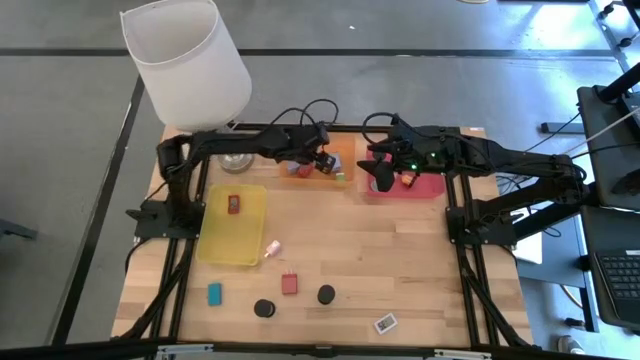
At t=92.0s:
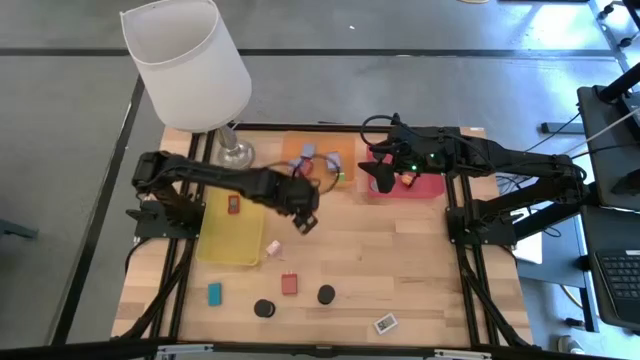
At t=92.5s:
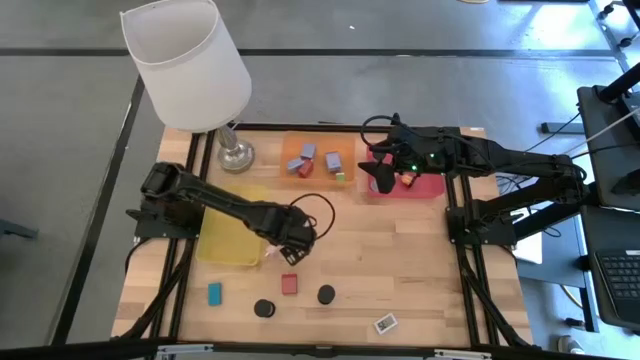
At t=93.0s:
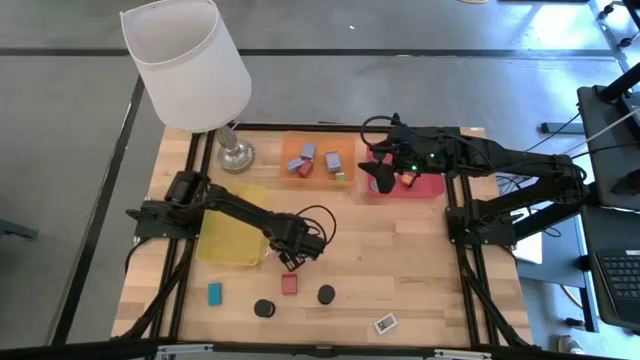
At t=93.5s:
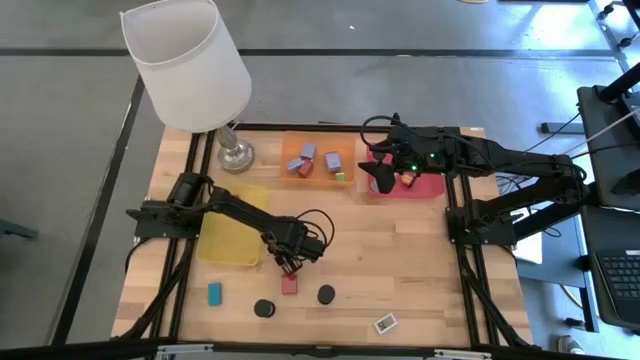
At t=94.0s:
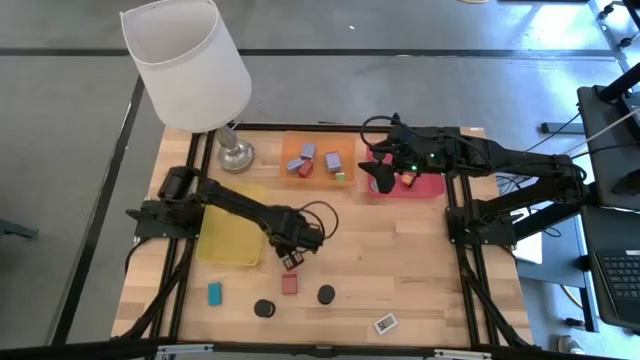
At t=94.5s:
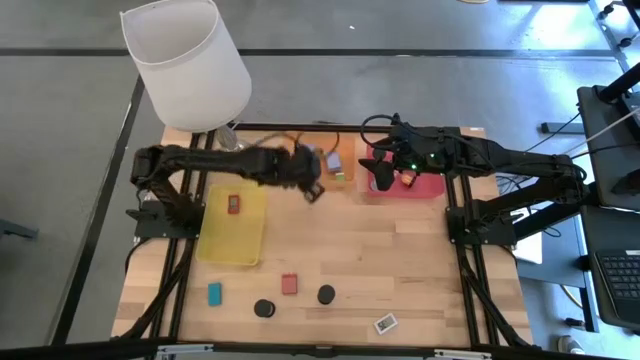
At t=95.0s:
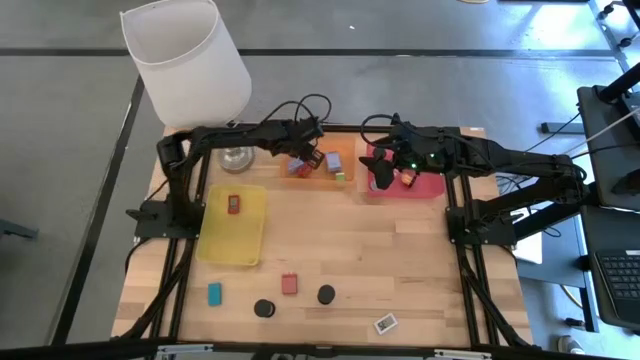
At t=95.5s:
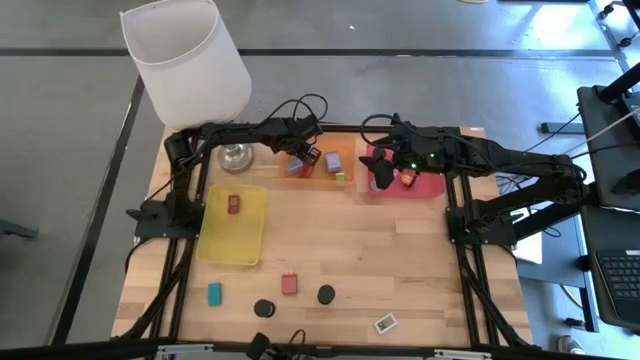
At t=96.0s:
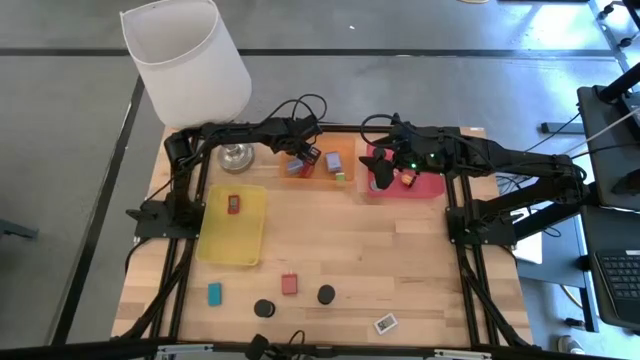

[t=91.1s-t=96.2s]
Task: Pick & Place Office items
Put the pink charger adapter into the orange bin

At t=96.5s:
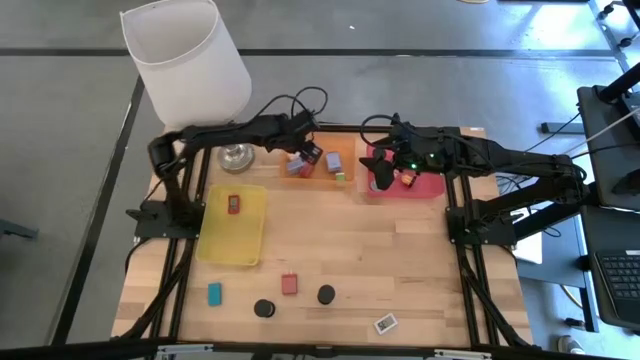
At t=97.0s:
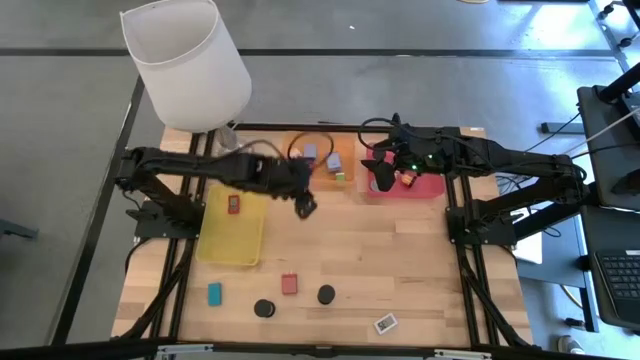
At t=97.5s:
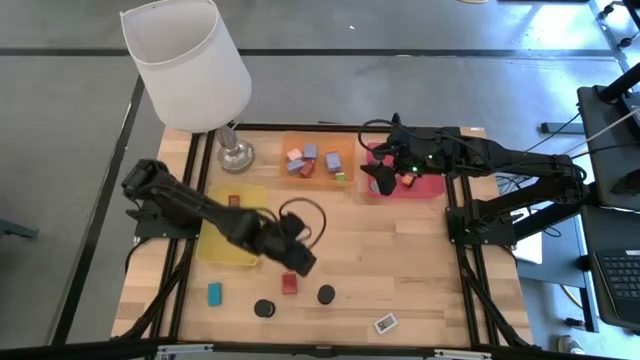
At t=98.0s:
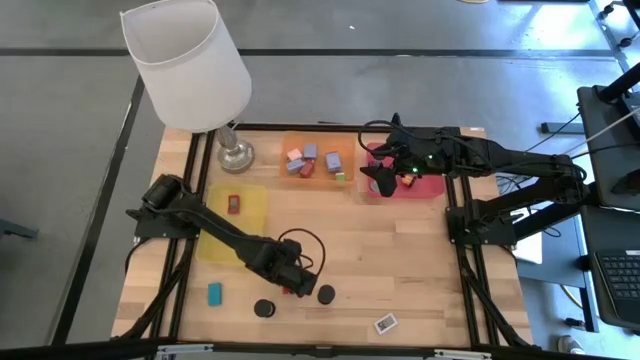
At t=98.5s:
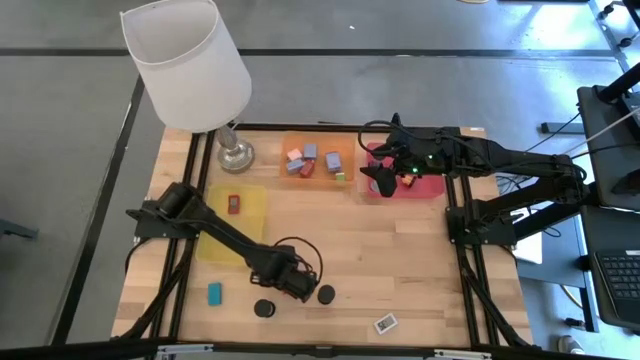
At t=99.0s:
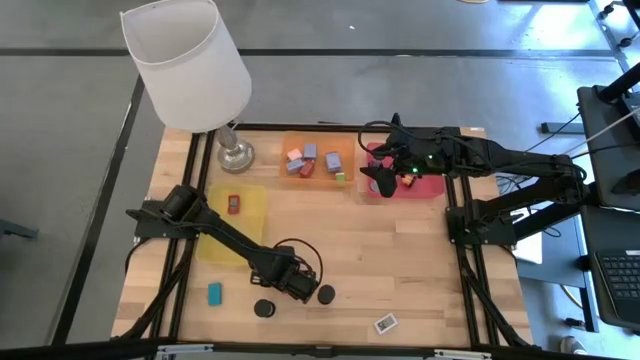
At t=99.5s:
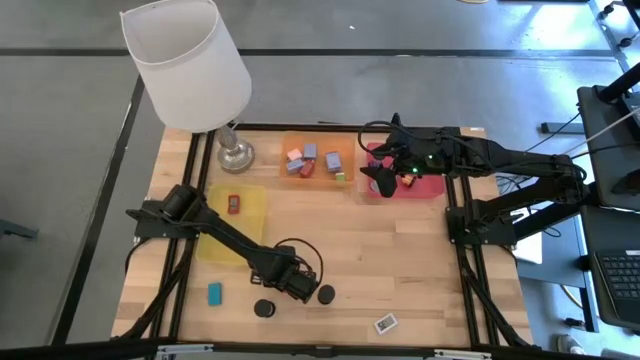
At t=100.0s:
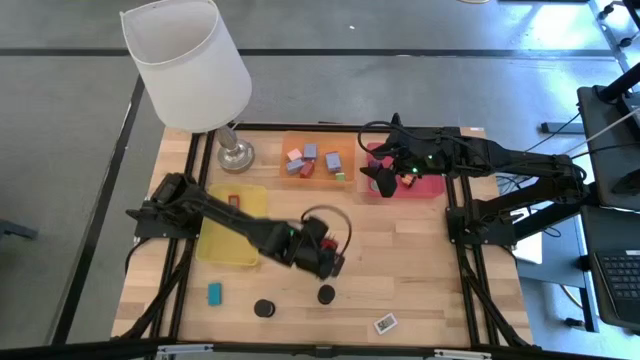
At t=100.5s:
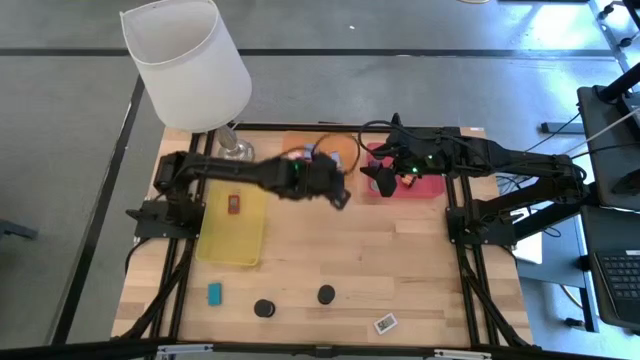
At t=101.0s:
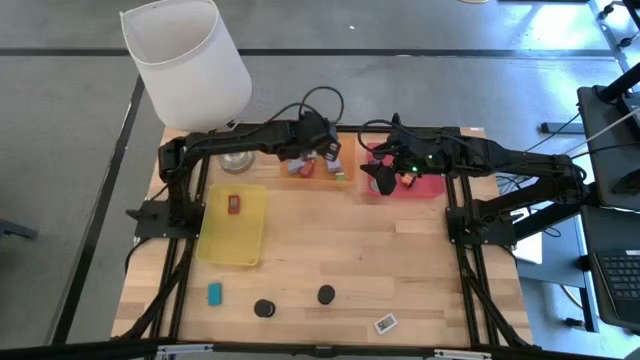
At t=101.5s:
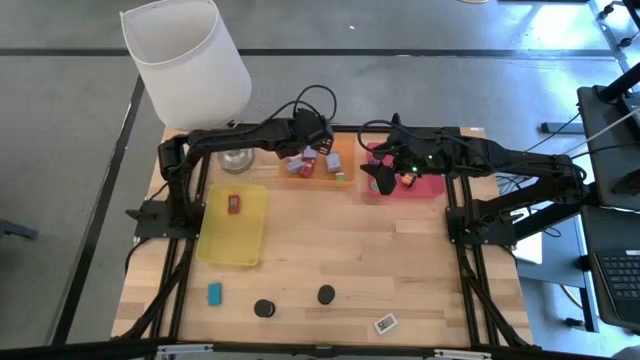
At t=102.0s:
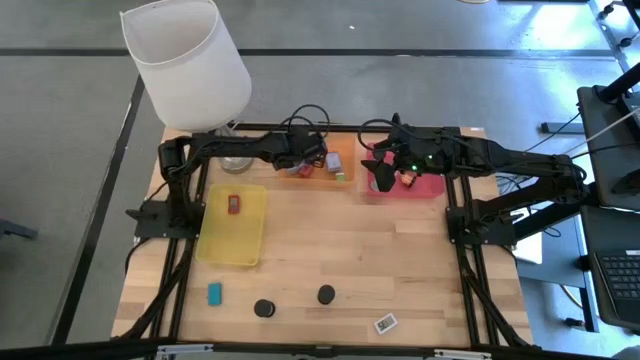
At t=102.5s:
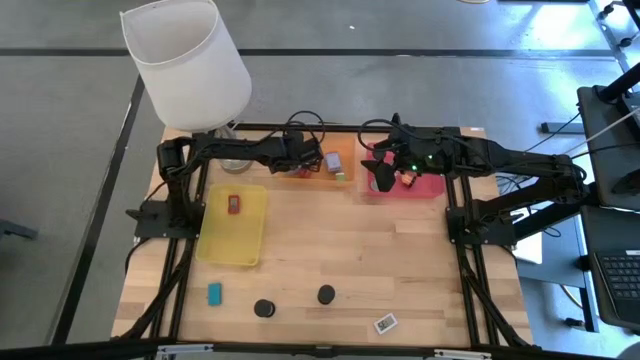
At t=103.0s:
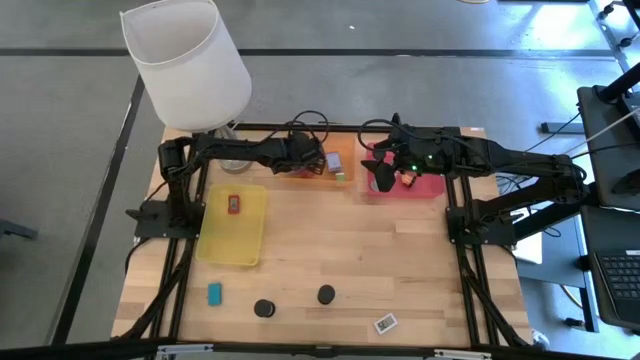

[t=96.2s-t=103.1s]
Put the red charger adapter into the orange bin

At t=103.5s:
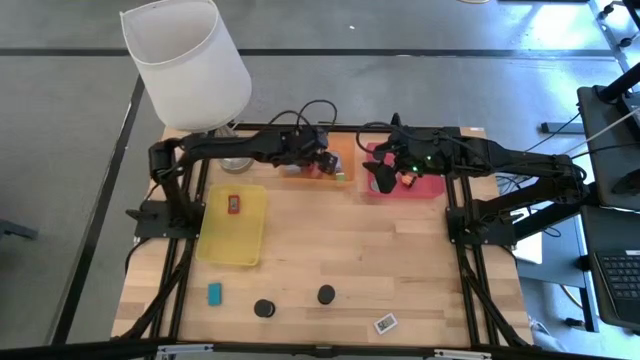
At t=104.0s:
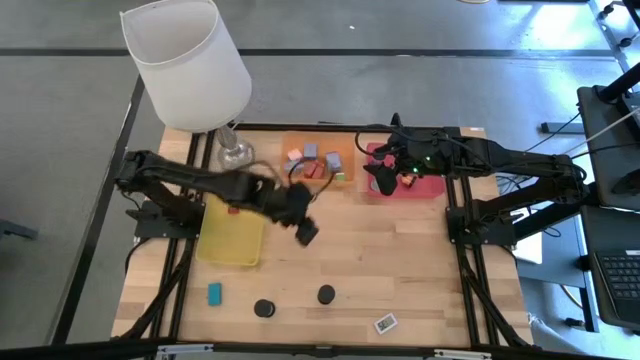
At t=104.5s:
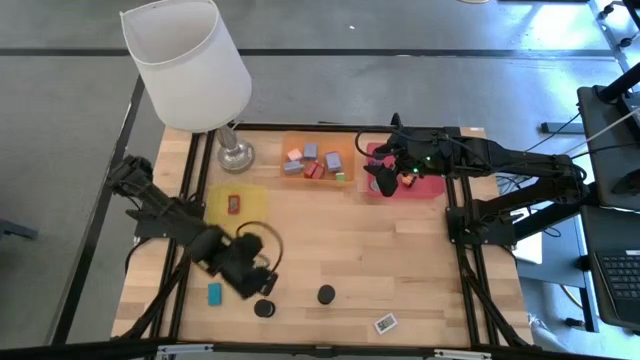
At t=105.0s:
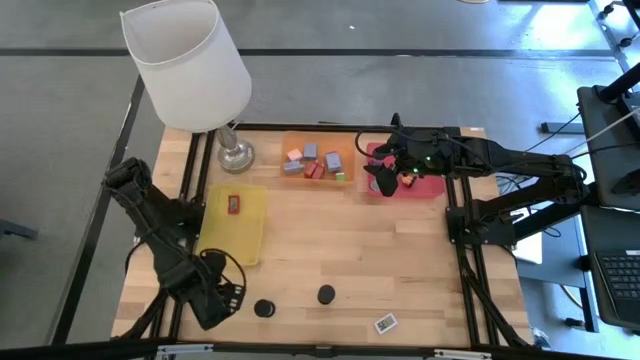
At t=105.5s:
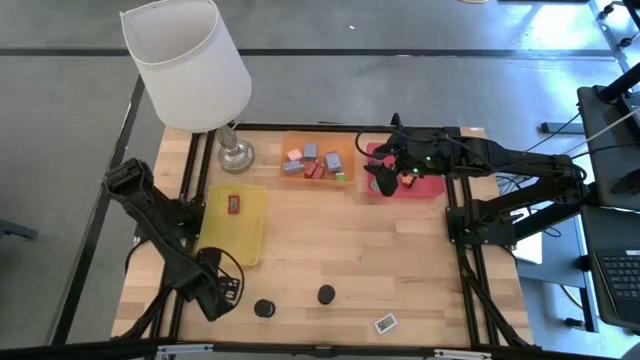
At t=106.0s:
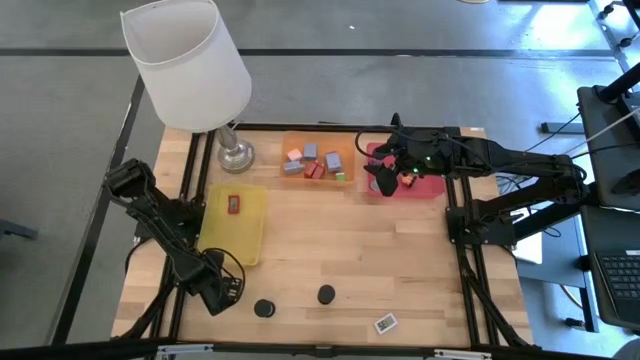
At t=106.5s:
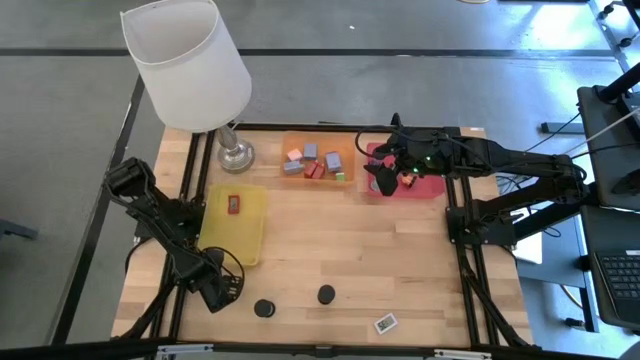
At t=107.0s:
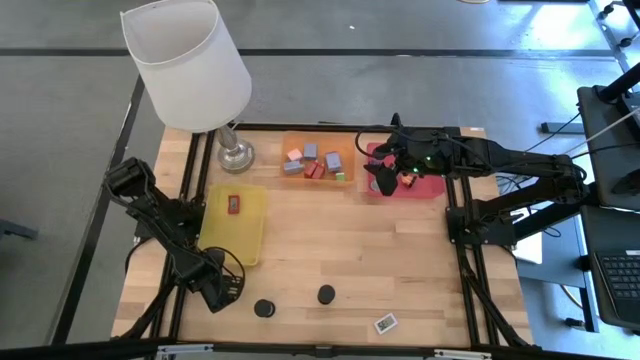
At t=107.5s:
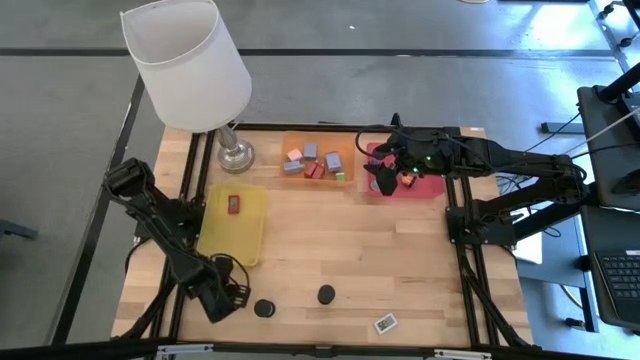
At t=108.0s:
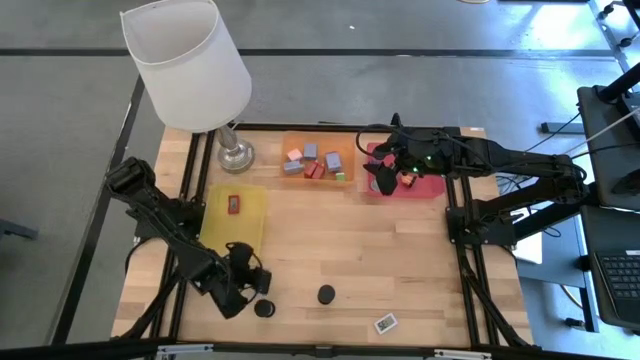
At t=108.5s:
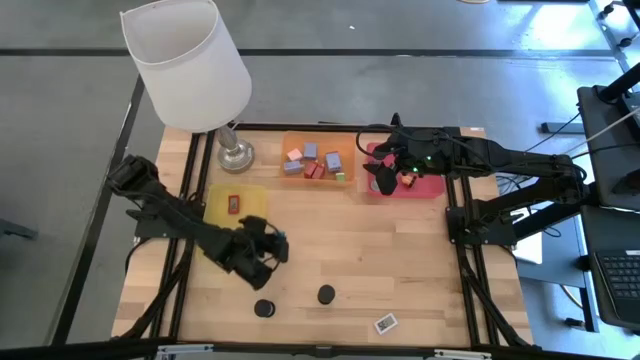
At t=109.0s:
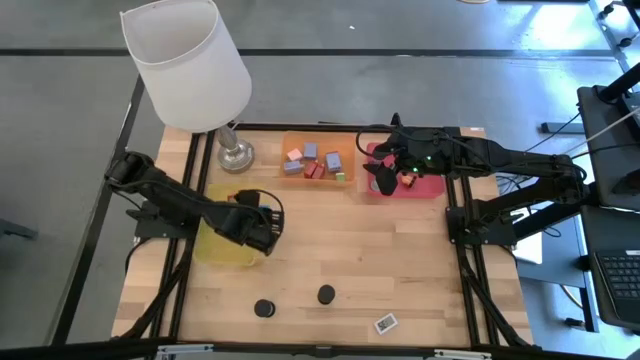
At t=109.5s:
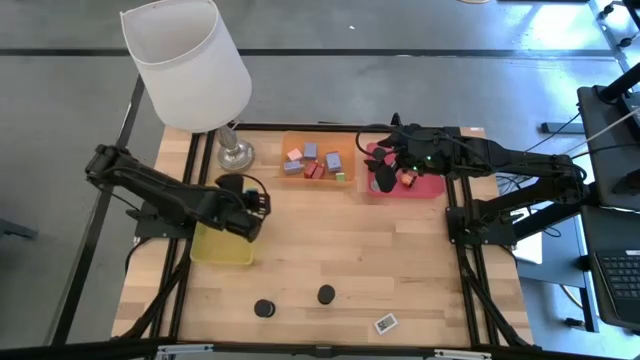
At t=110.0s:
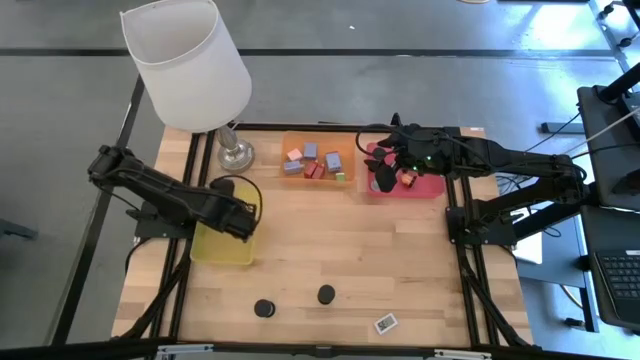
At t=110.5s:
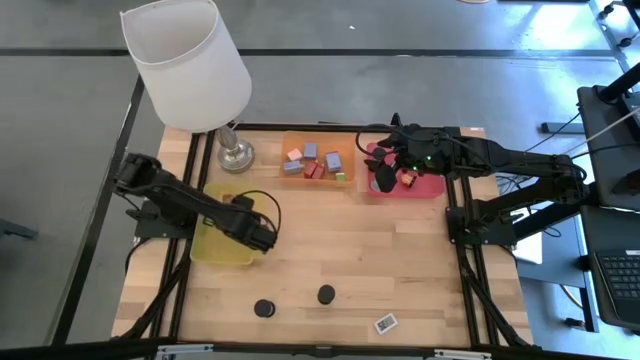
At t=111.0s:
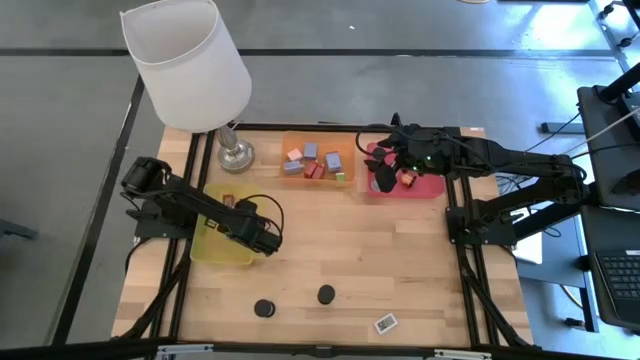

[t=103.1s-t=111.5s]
Put the blue digital timer into the yellow bin
